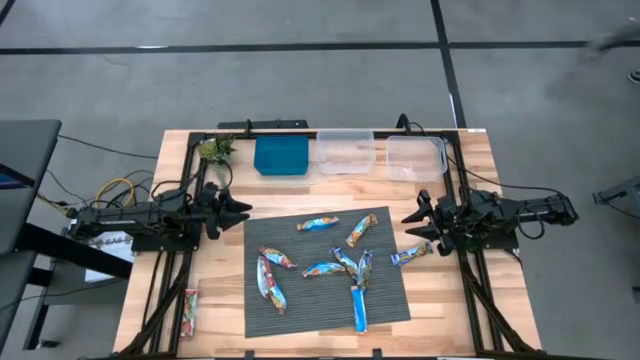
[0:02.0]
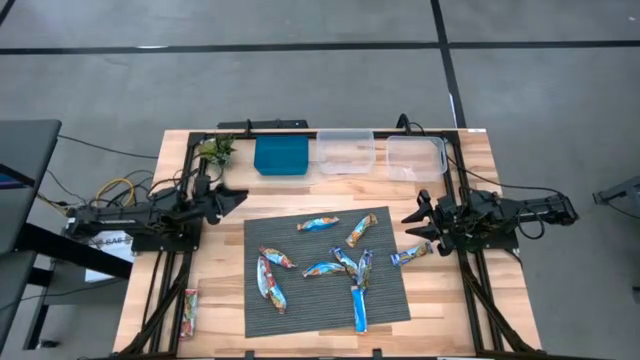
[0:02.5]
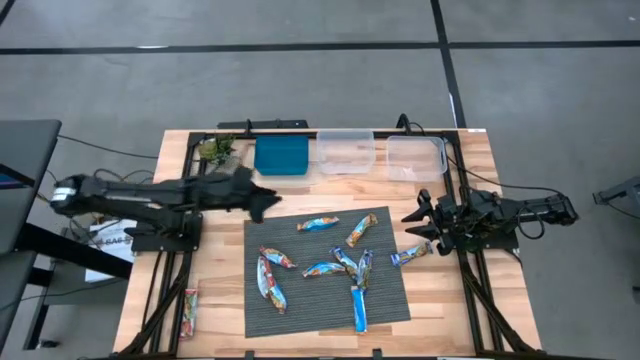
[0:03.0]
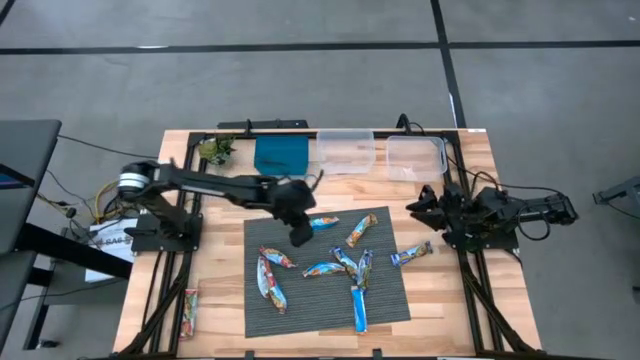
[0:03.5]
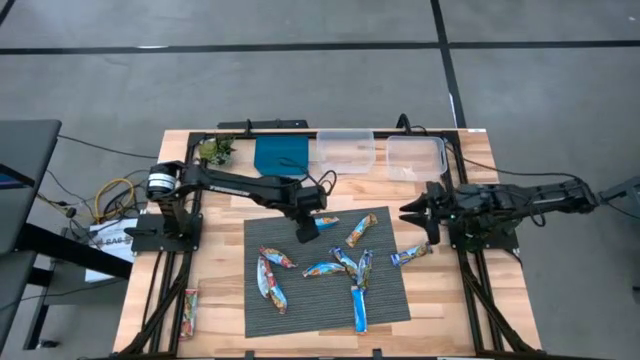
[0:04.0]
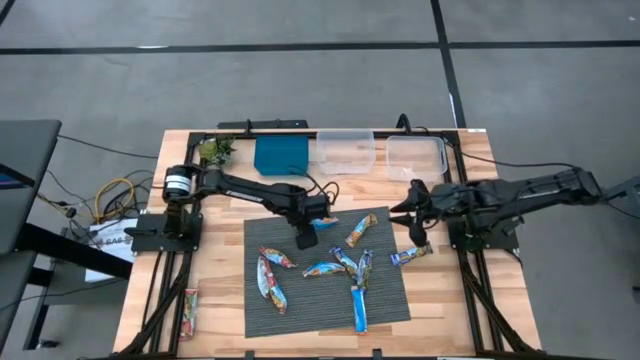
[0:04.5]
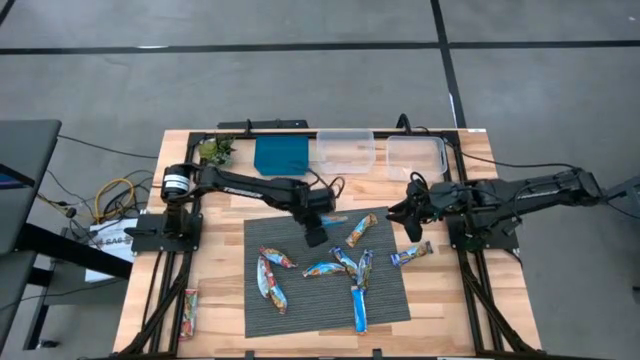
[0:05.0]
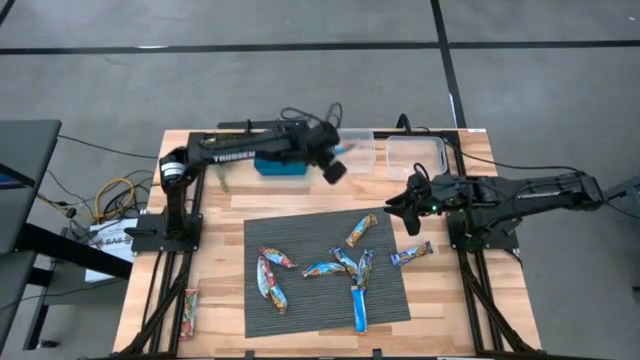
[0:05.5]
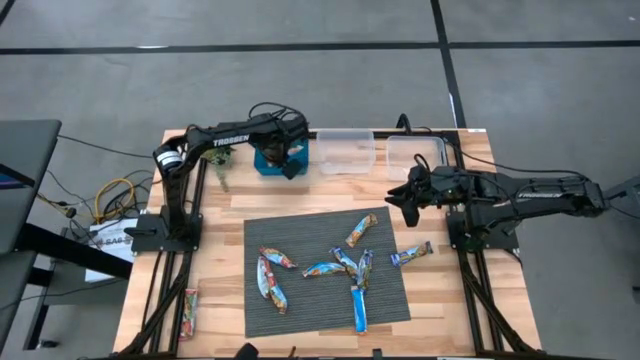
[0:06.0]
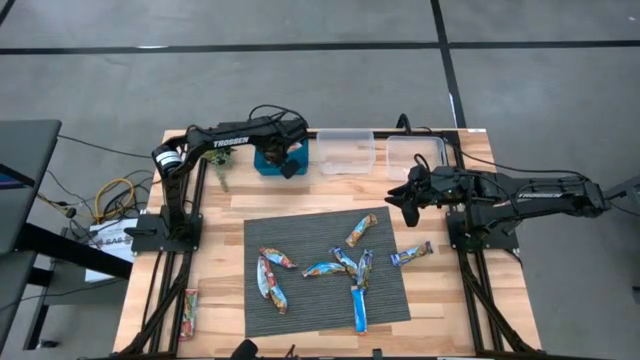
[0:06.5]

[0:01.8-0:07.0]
Task: Pick and place Granola Bars by type
Put the orange granola bar into the blue bin

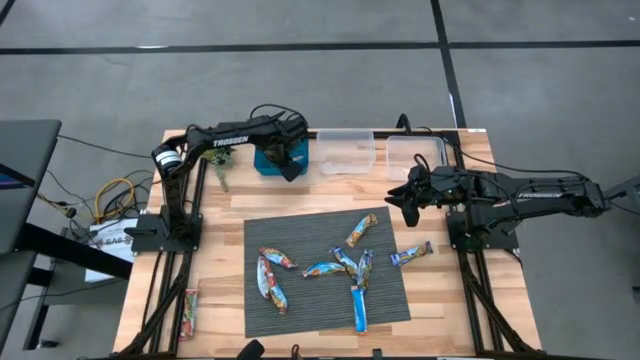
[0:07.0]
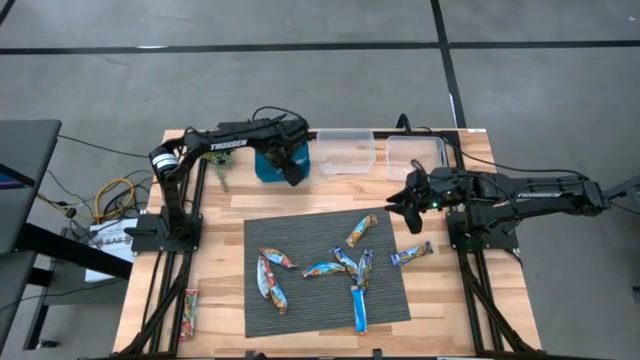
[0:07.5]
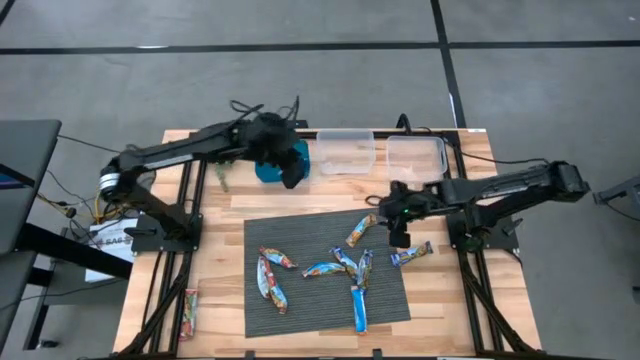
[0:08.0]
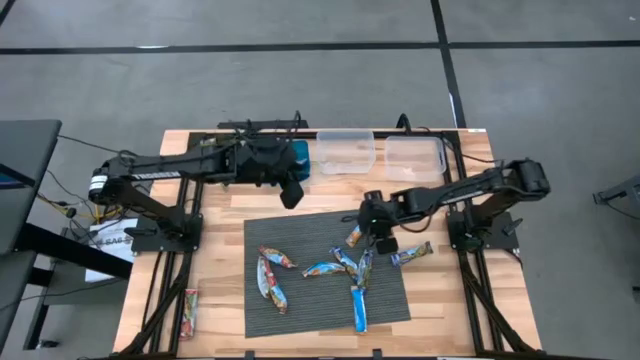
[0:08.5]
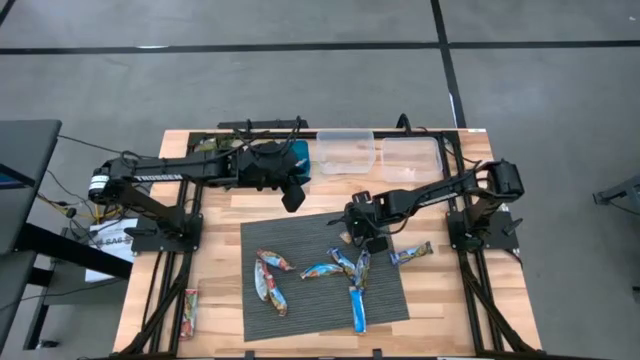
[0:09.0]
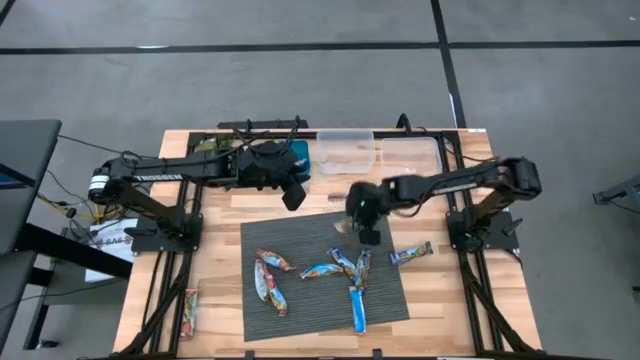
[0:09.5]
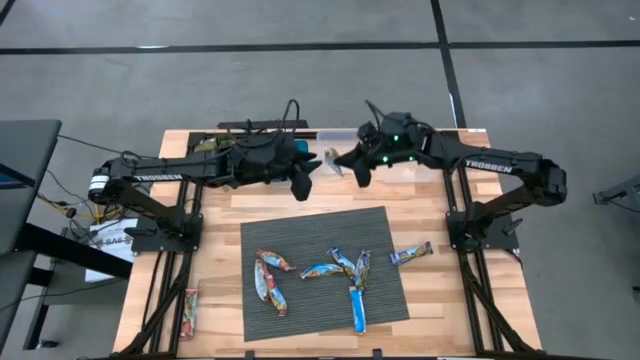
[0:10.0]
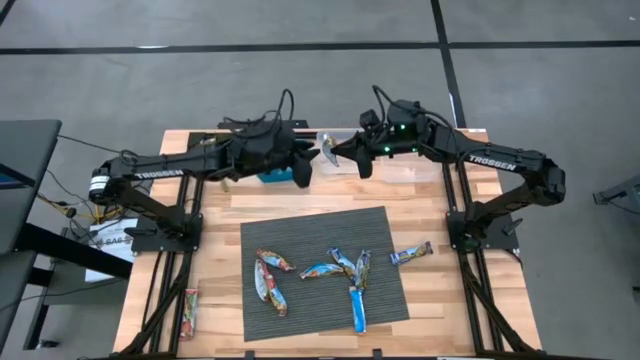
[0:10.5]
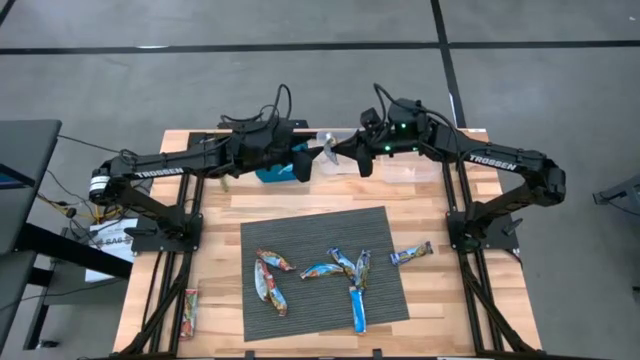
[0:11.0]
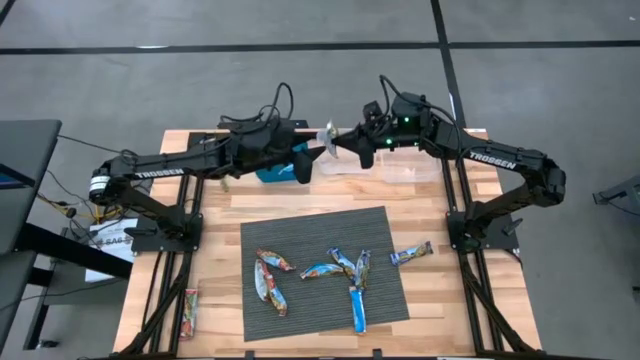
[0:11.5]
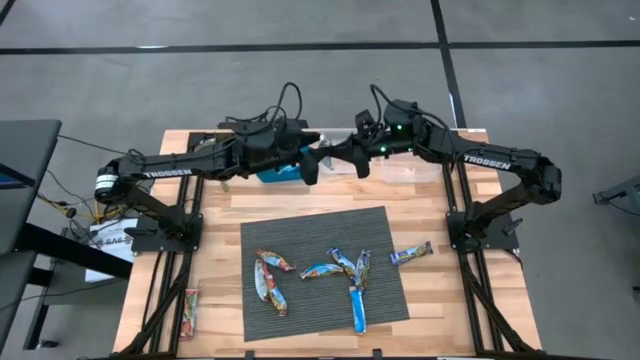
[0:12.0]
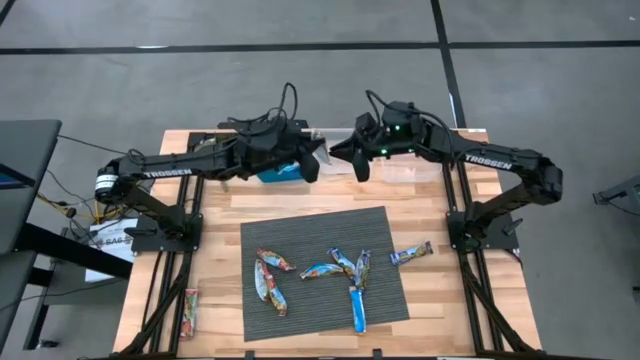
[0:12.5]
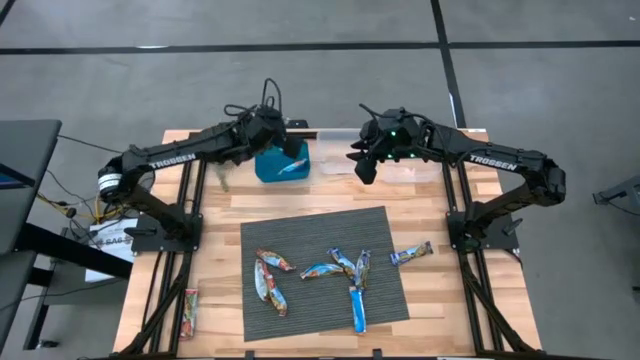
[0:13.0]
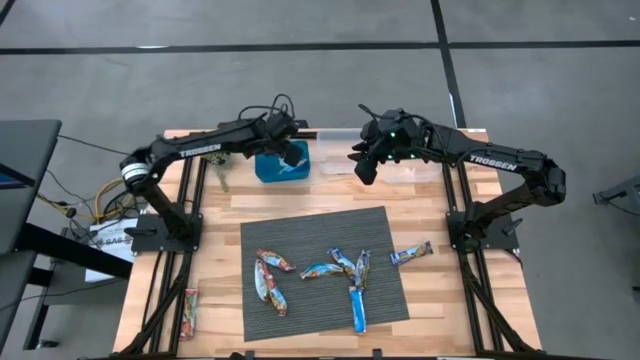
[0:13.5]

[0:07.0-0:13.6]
Put the orange granola bar into the blue bin

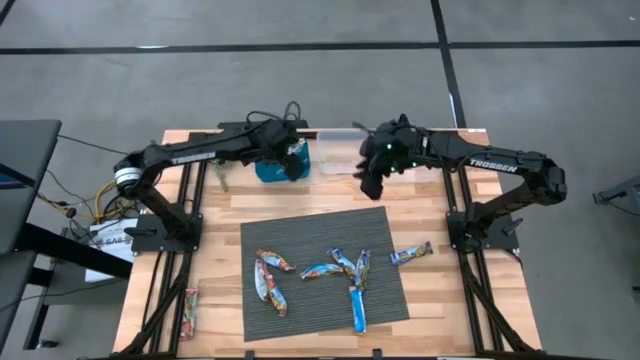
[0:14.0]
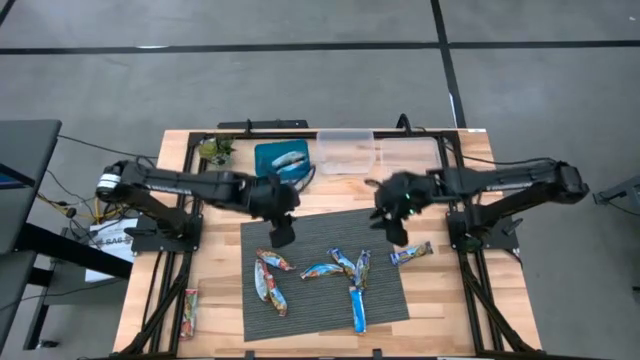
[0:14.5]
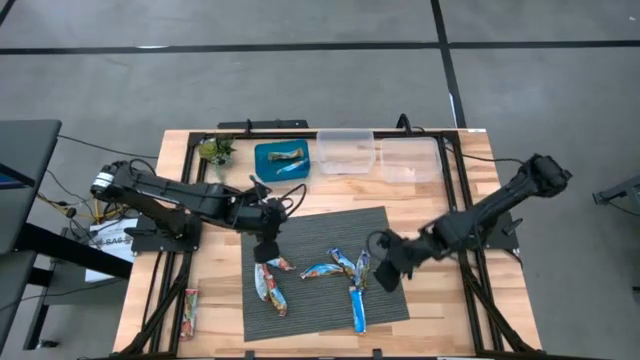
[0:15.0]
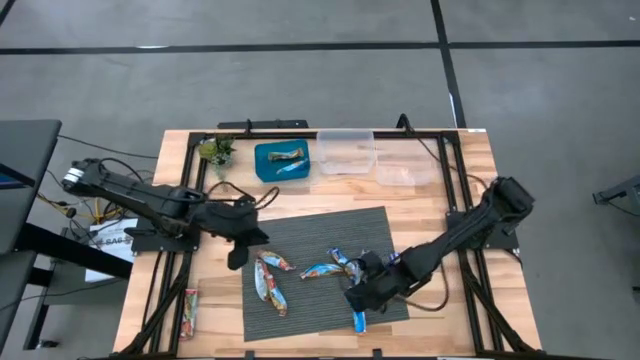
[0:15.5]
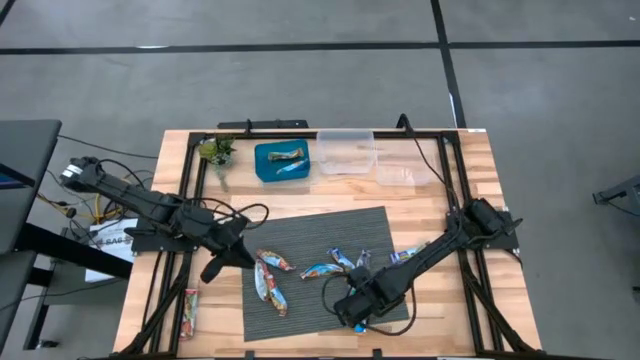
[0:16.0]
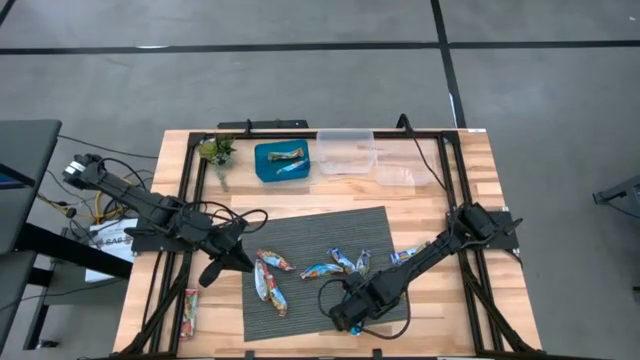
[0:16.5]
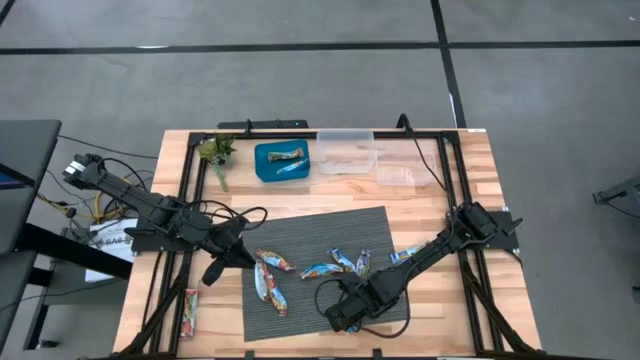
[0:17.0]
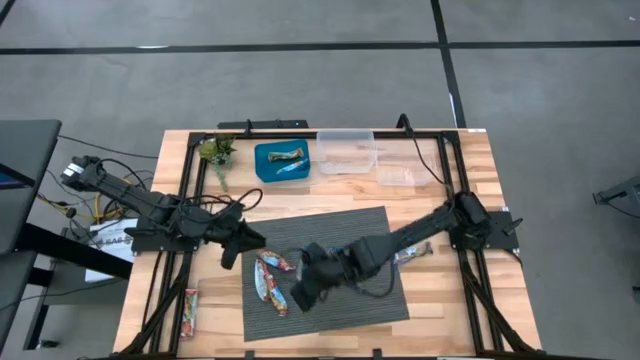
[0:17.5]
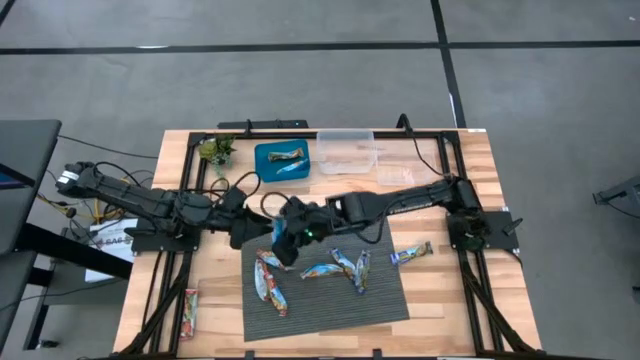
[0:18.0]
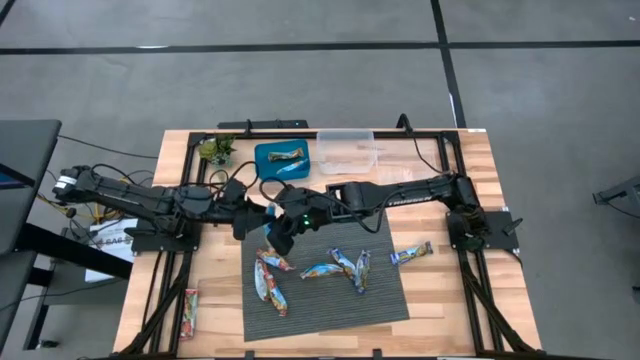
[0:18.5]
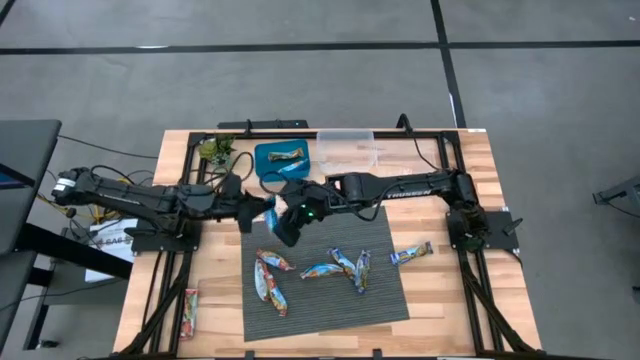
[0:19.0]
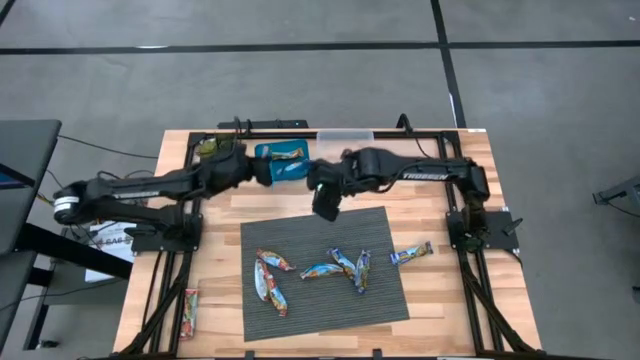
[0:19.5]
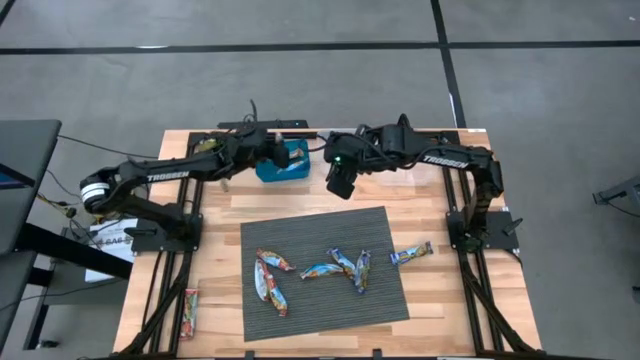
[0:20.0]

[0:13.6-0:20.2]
Put the orange granola bar into the blue bin

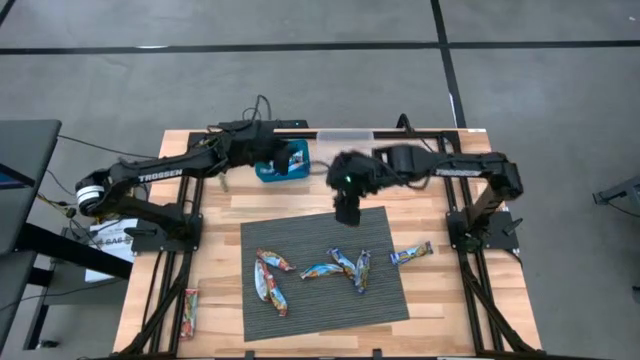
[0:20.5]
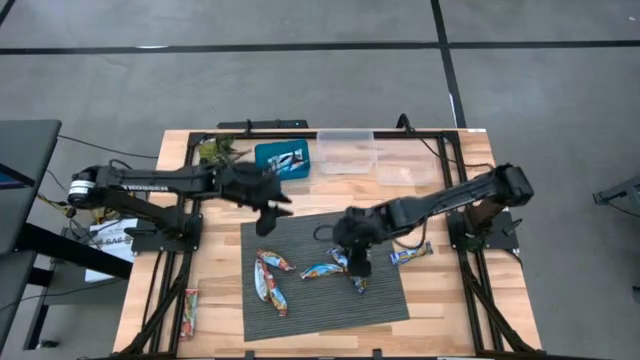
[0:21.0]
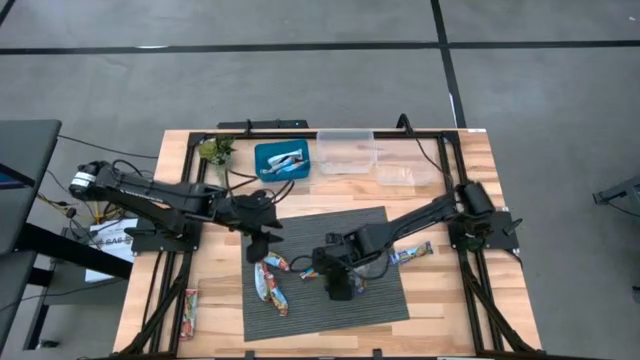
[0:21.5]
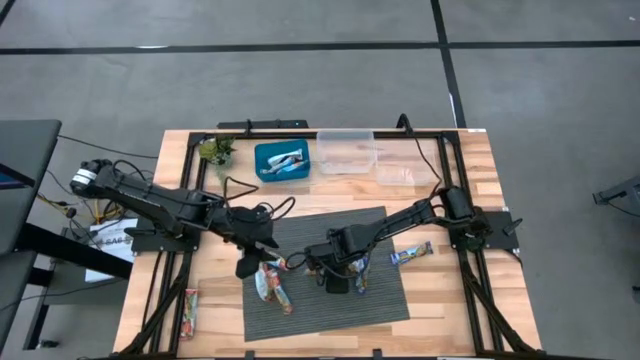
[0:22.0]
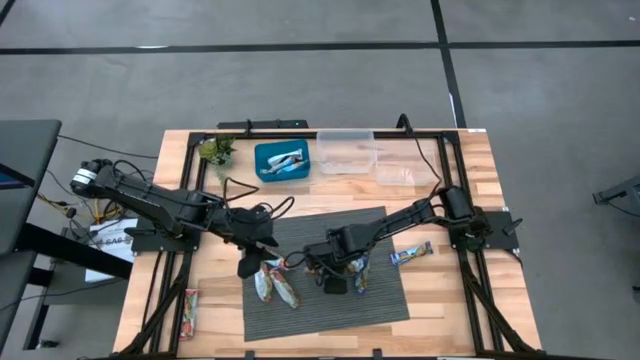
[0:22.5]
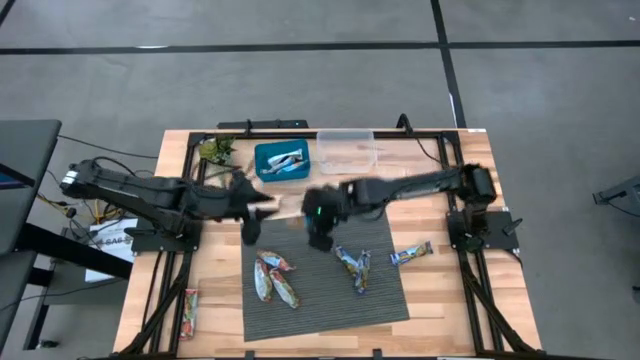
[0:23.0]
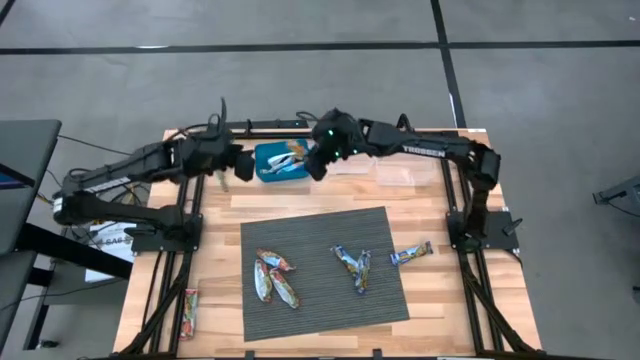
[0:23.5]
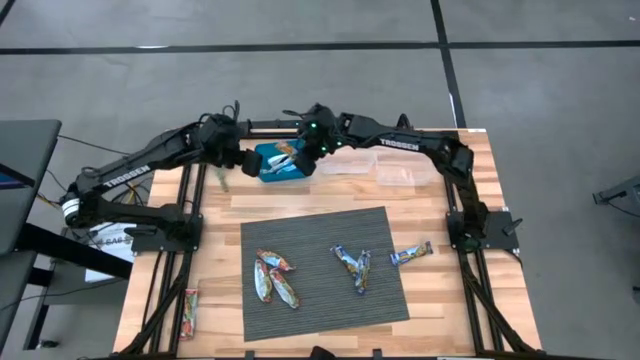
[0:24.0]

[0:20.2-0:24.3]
Put the orange granola bar into the blue bin
